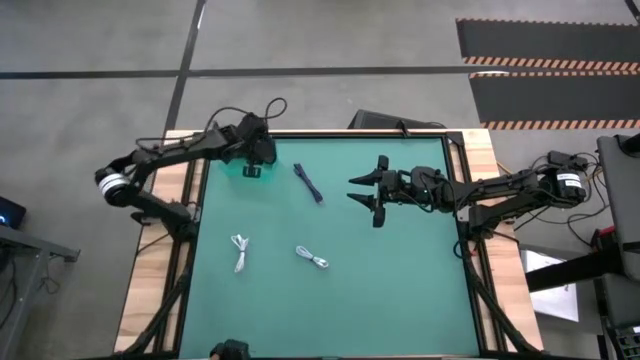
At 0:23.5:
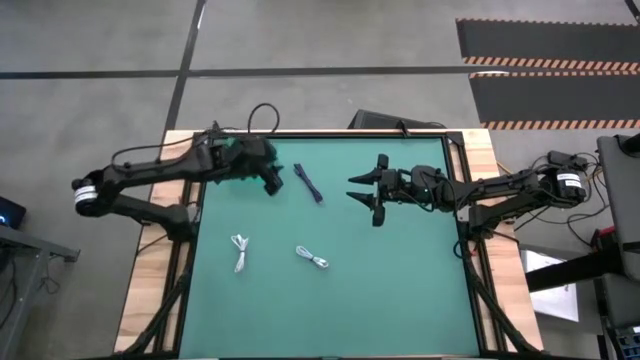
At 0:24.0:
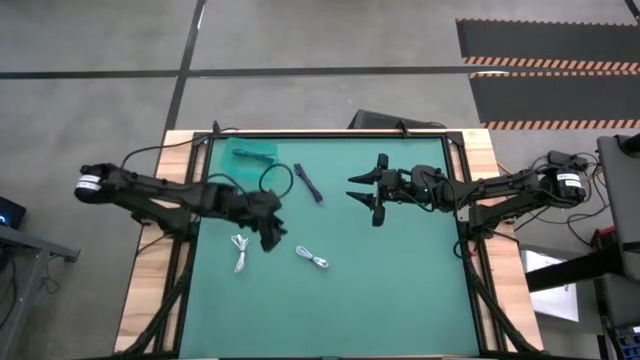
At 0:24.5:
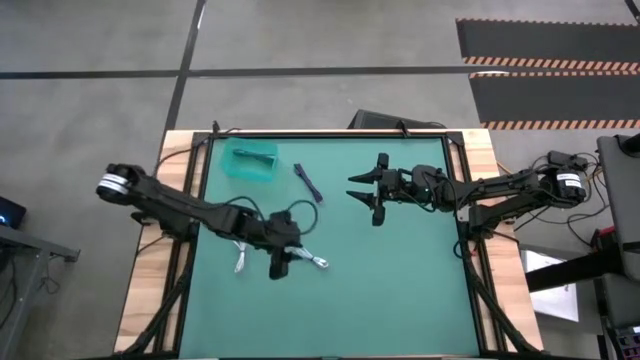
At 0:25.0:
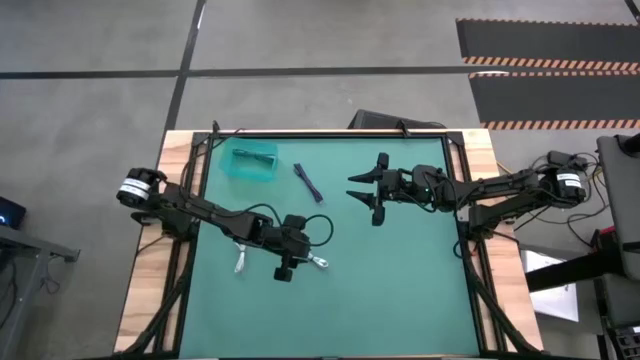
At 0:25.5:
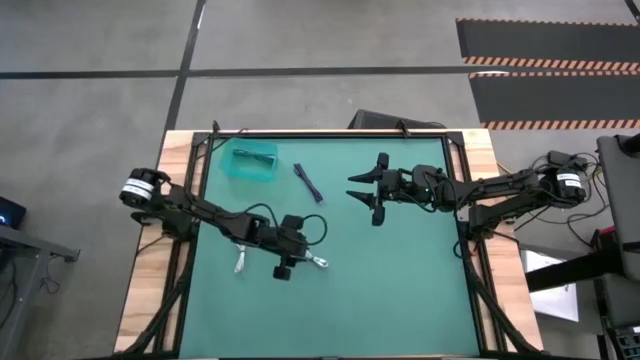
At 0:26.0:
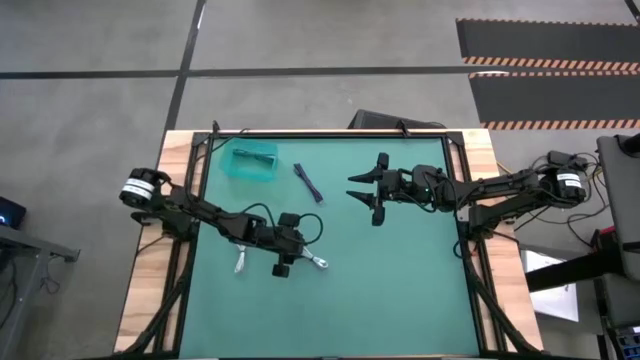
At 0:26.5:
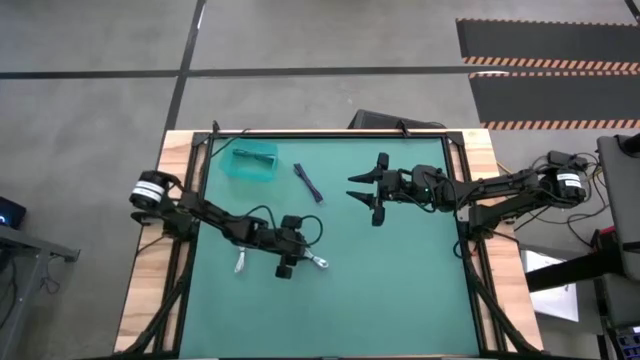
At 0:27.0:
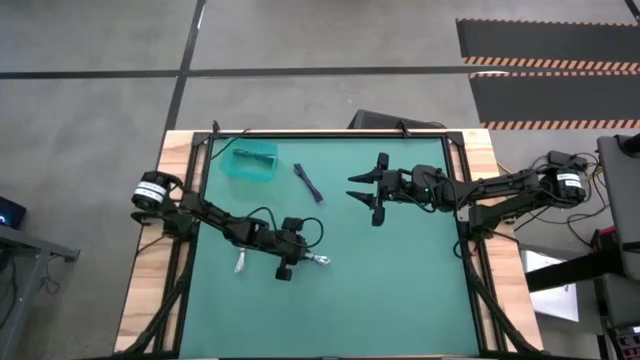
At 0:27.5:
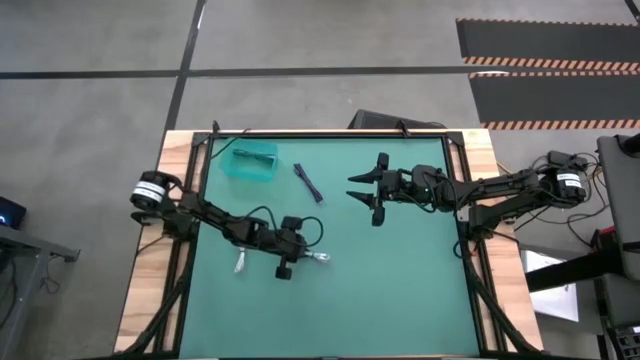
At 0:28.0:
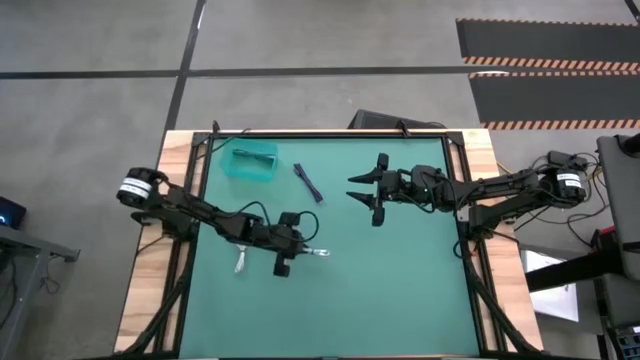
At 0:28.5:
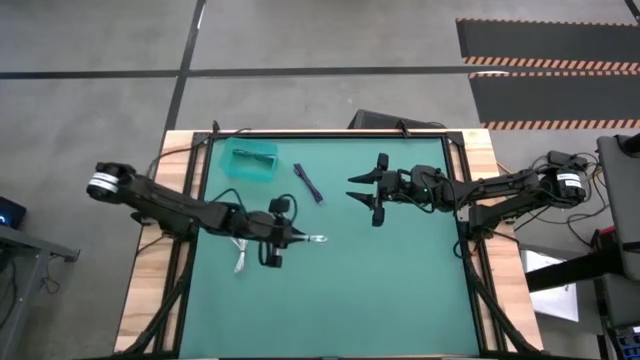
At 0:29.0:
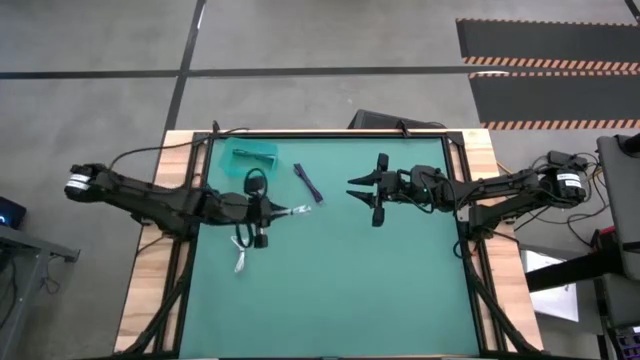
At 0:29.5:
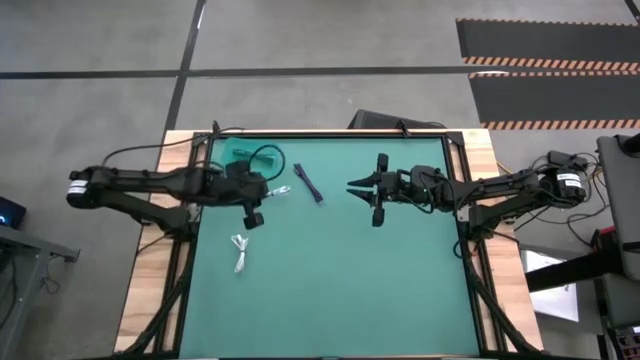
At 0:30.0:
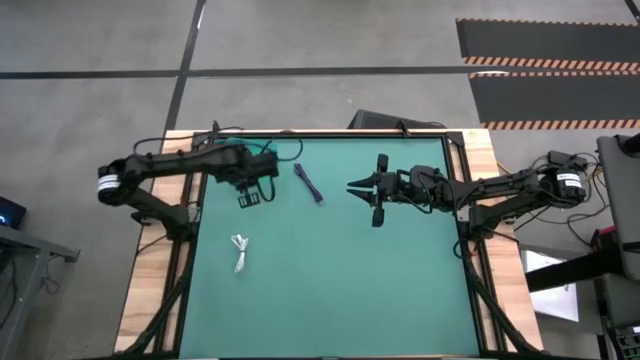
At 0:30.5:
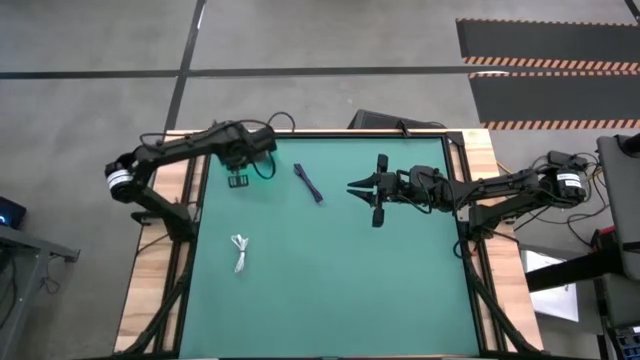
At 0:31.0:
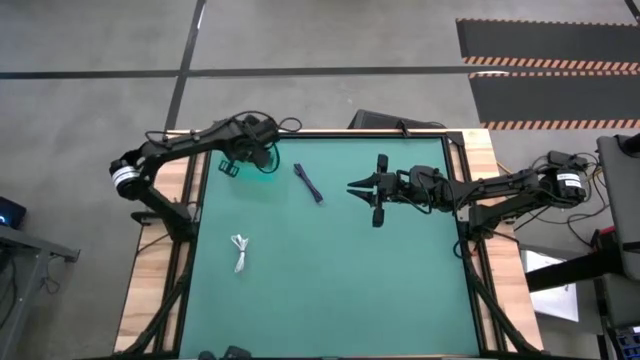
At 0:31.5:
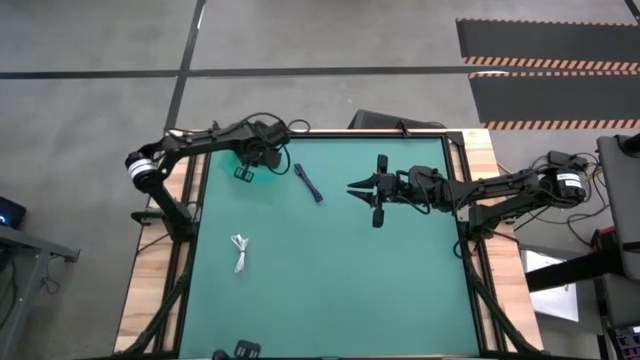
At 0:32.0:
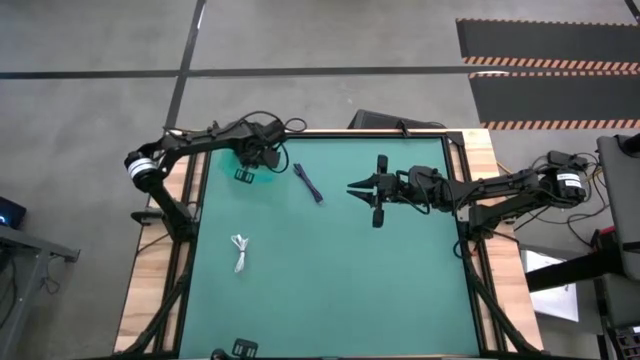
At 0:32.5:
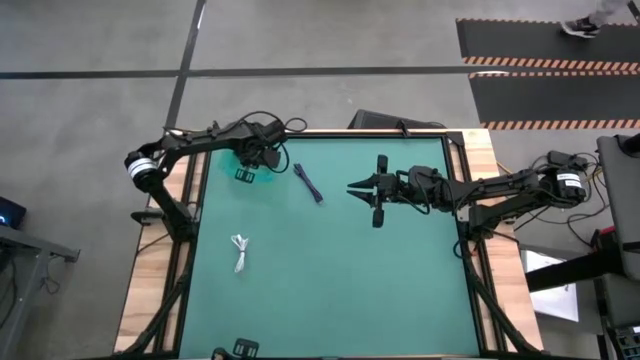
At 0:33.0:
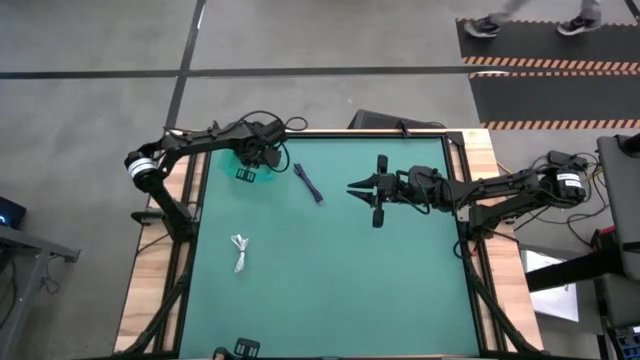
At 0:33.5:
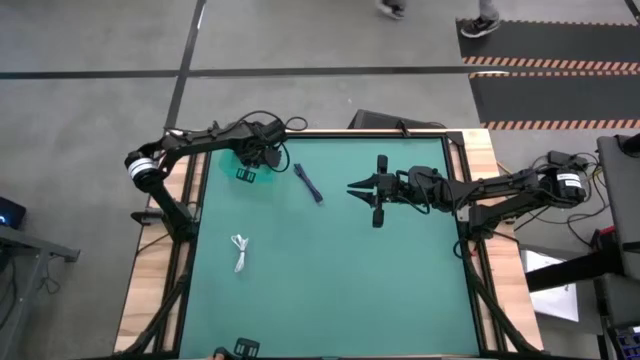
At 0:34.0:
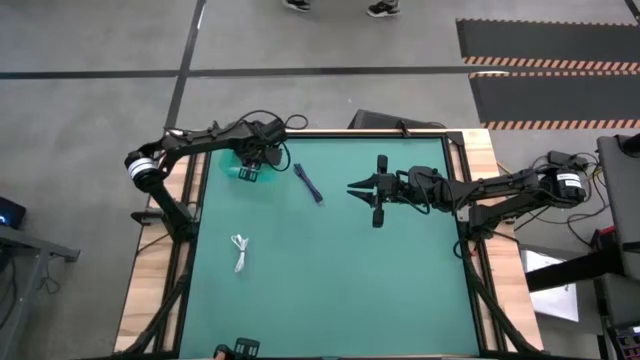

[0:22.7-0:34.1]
Task: Pick and place USB-C Cables
Put the right white charger cable into the blue bin

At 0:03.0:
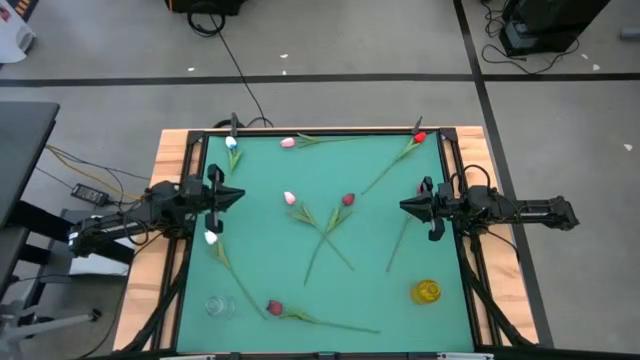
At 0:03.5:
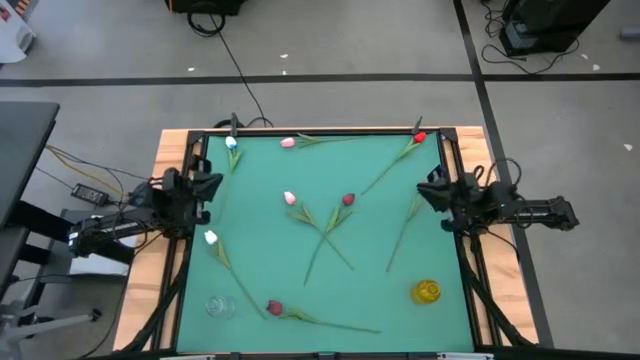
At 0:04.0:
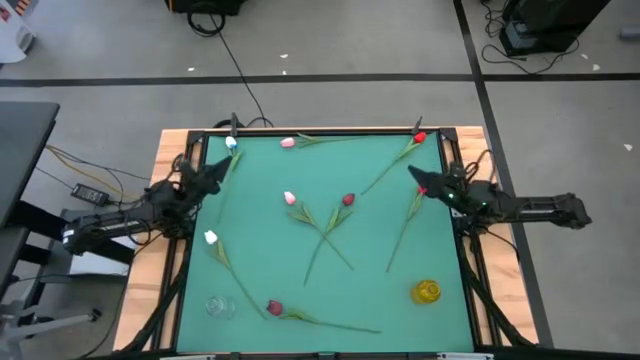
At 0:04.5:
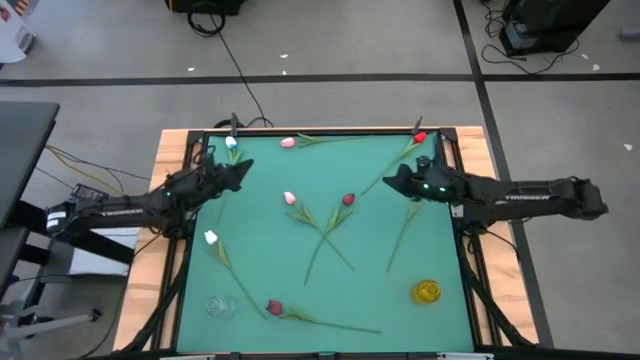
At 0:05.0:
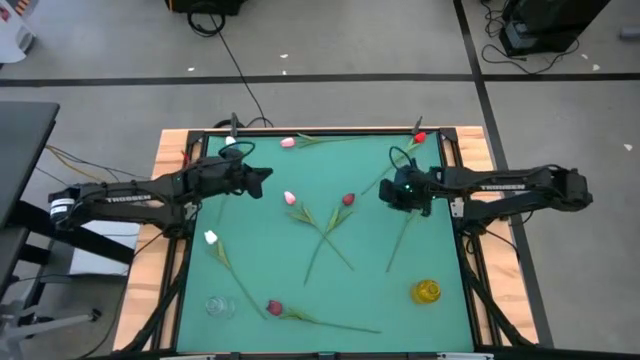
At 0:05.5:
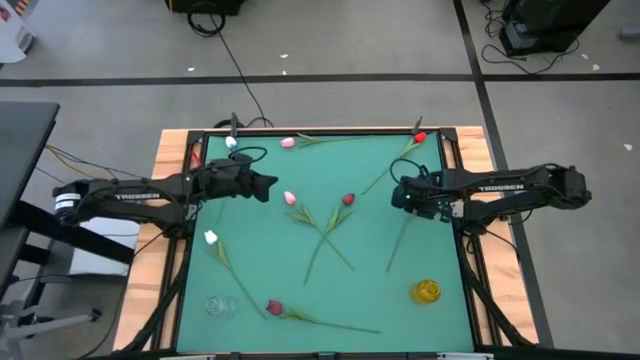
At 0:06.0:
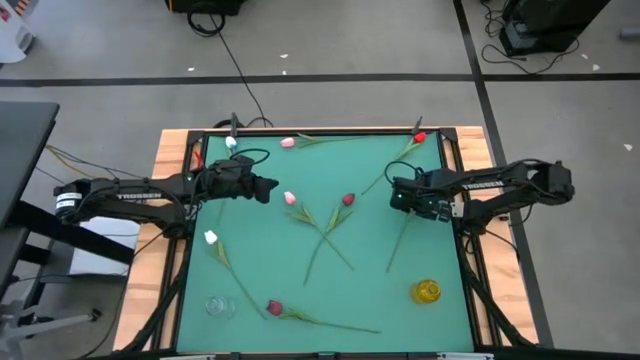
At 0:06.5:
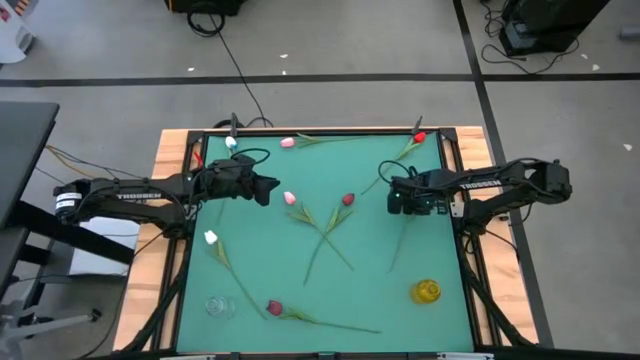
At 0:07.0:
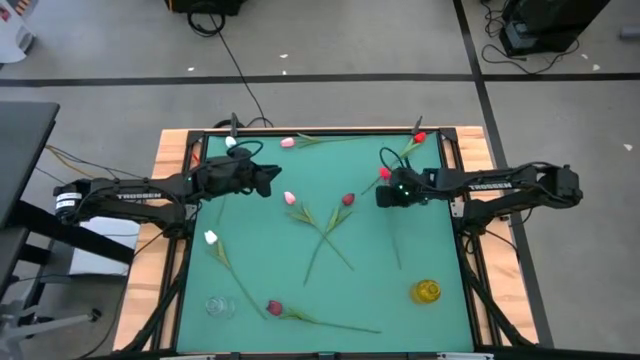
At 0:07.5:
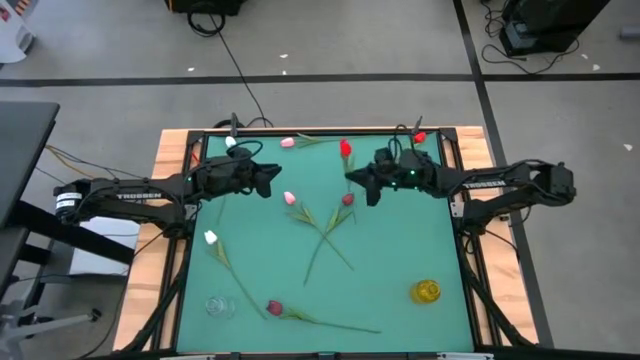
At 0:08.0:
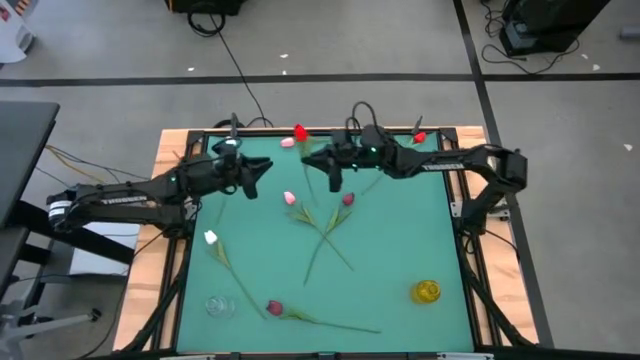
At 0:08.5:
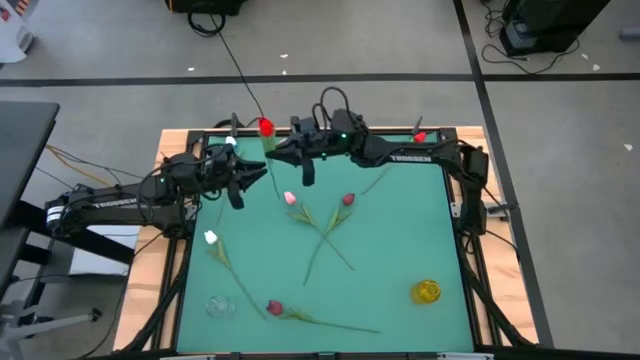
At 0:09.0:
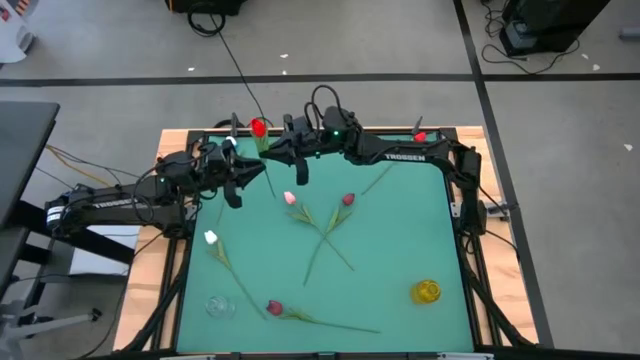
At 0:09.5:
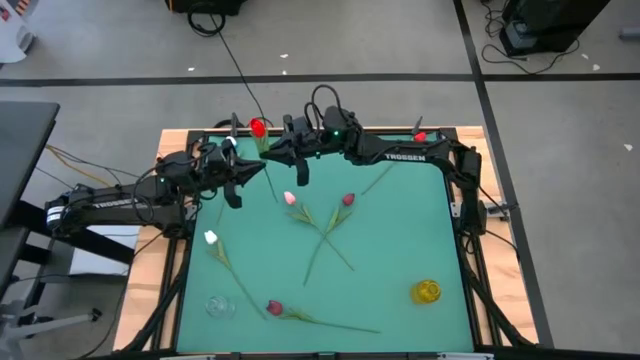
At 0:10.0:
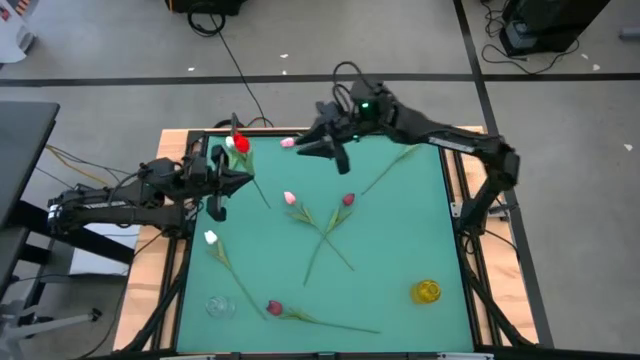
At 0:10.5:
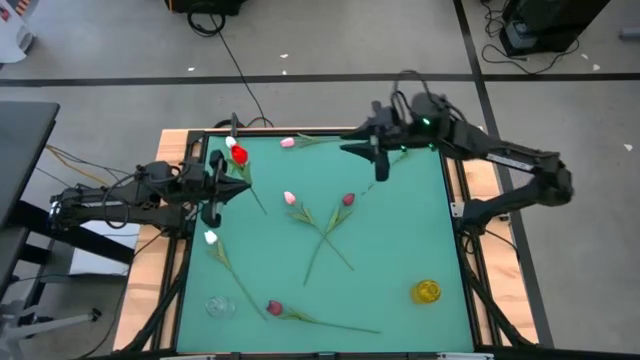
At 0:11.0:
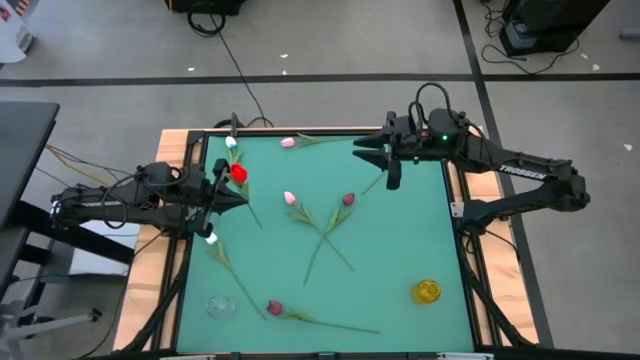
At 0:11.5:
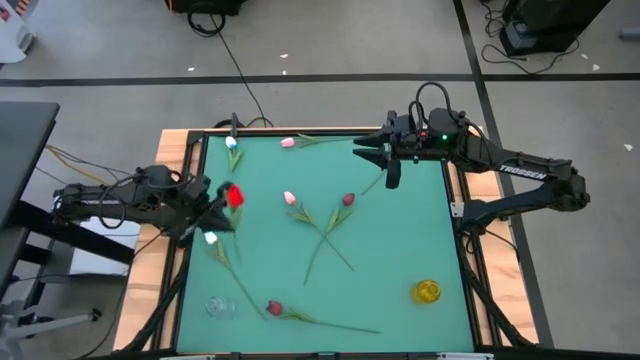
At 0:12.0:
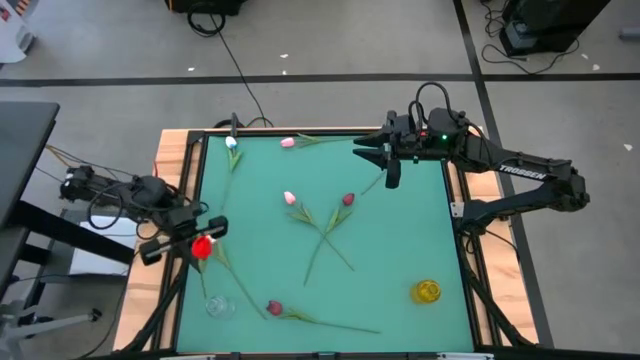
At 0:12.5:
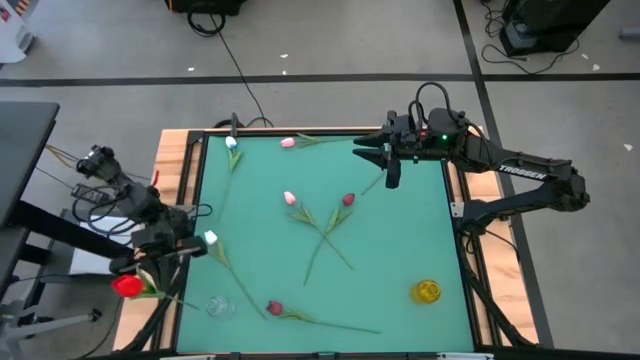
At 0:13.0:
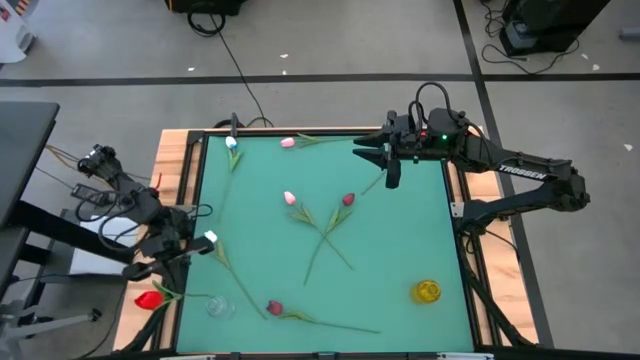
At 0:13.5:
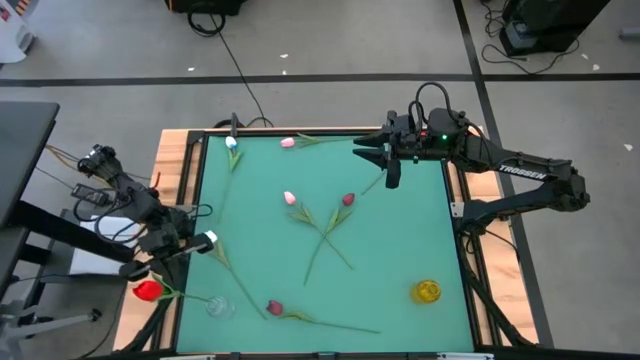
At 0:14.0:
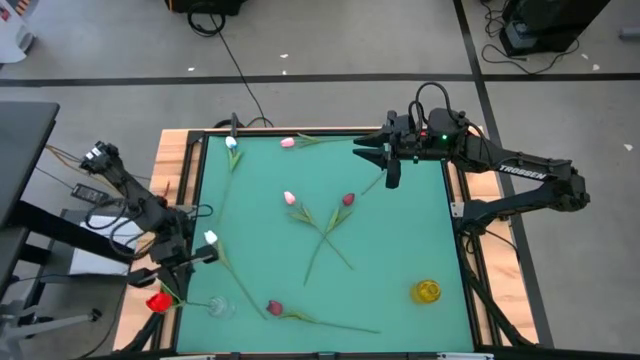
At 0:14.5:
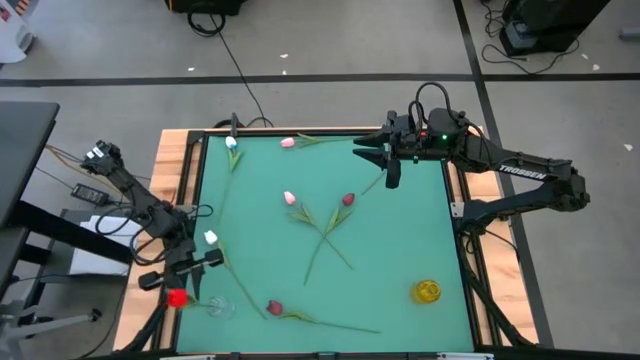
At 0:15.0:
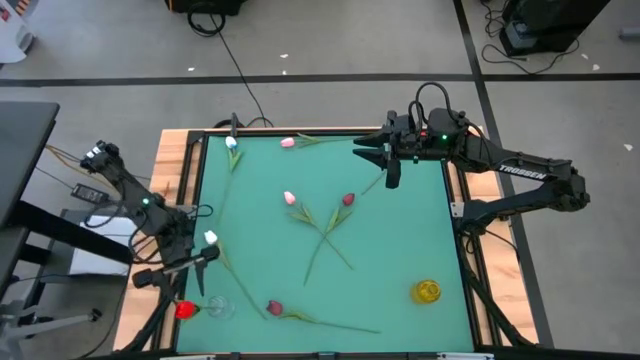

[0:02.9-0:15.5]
Task: Sort flowers into vase by color
Put the bottom red tulip into the white transparent vase
